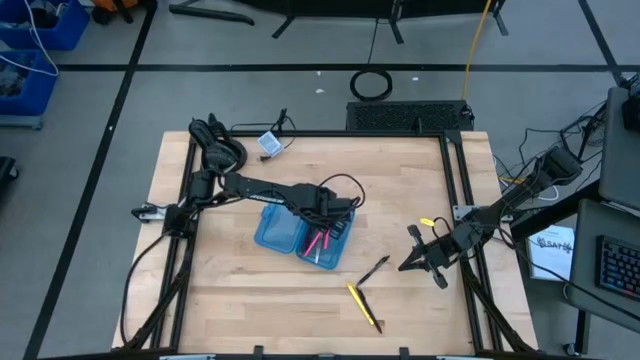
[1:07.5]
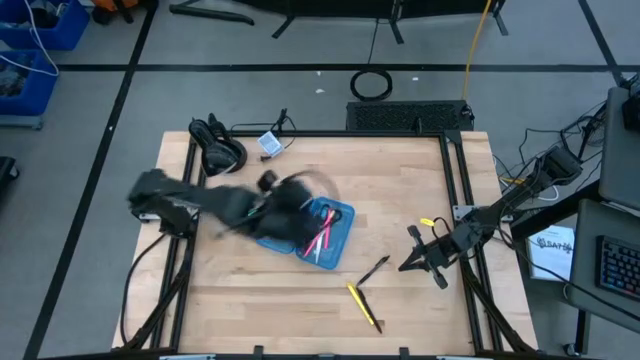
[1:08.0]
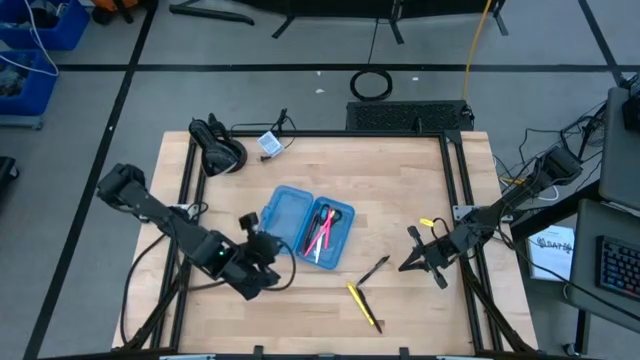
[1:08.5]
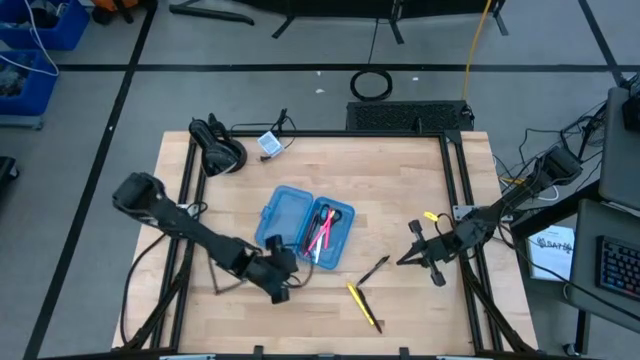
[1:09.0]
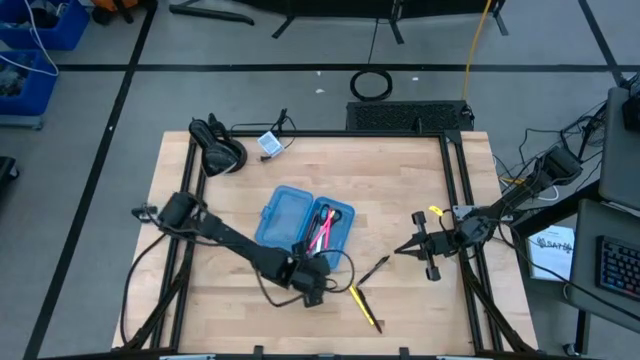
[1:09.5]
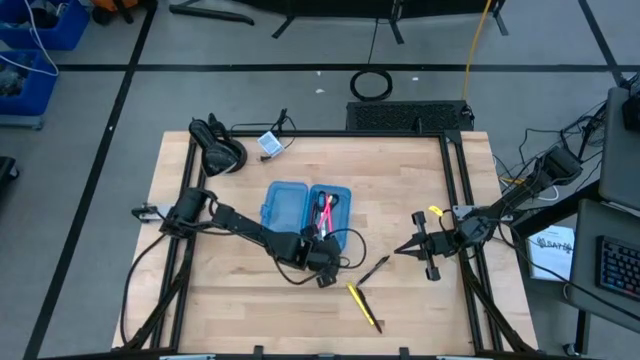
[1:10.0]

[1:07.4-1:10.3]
Task: Pick & place school supplies into a supply box
Adjust the blue supply box

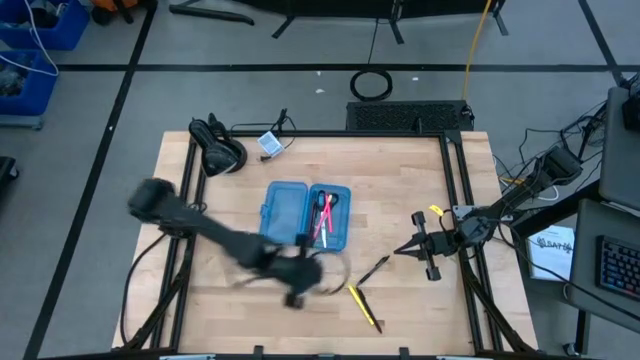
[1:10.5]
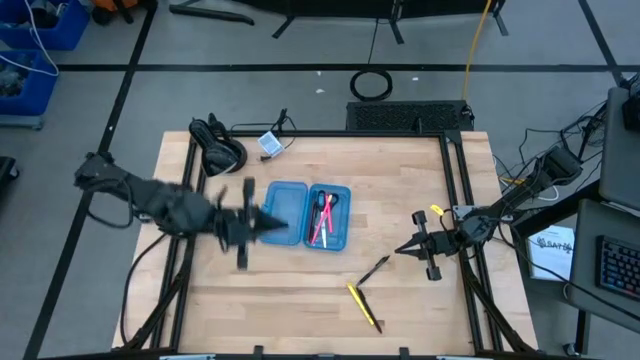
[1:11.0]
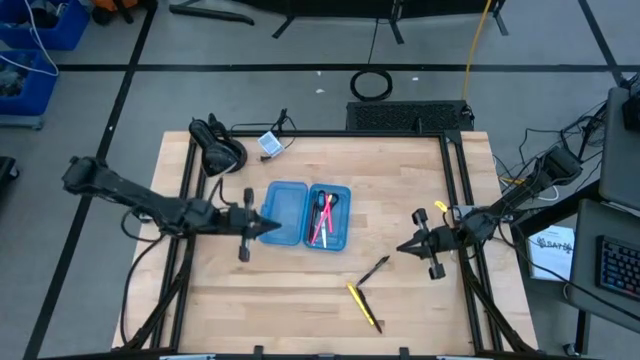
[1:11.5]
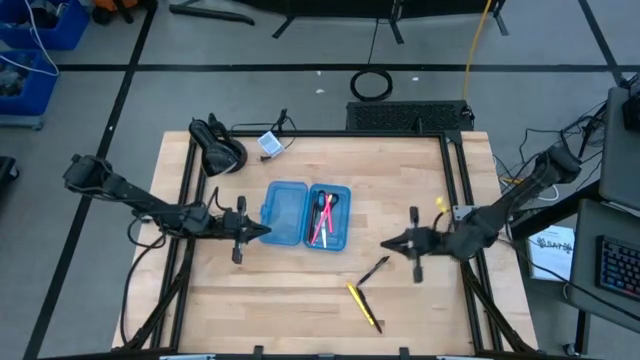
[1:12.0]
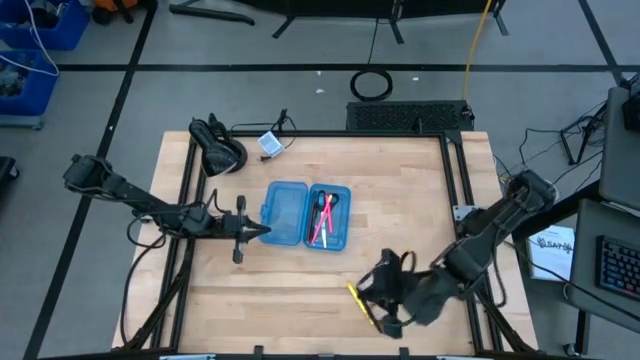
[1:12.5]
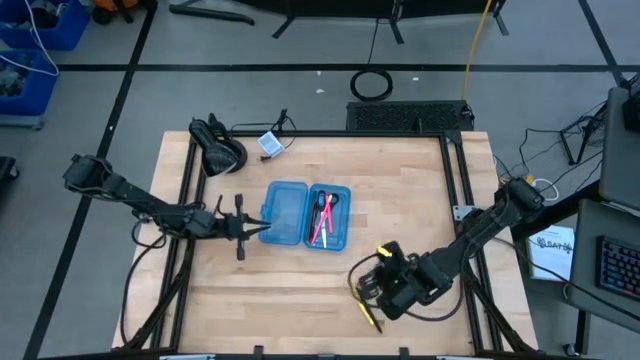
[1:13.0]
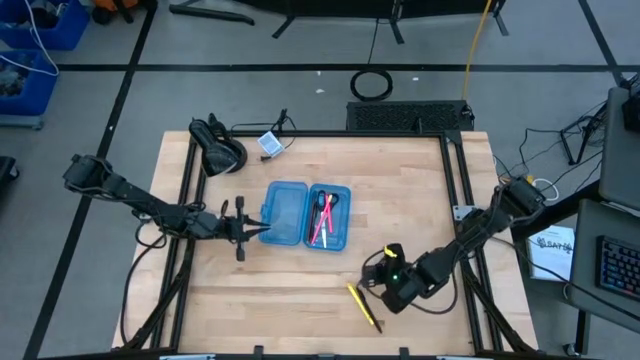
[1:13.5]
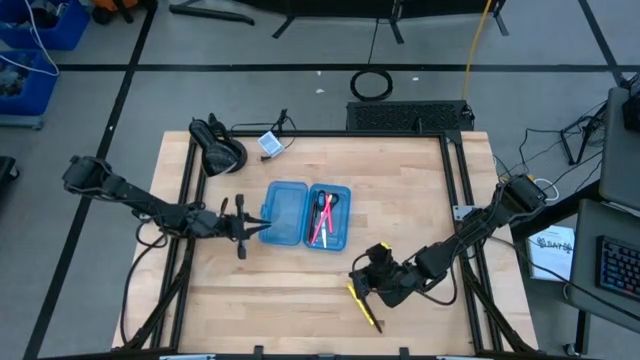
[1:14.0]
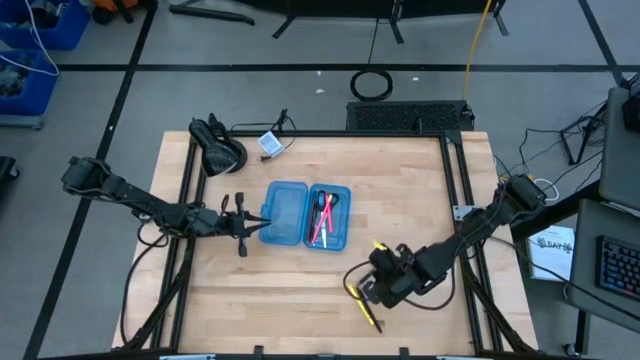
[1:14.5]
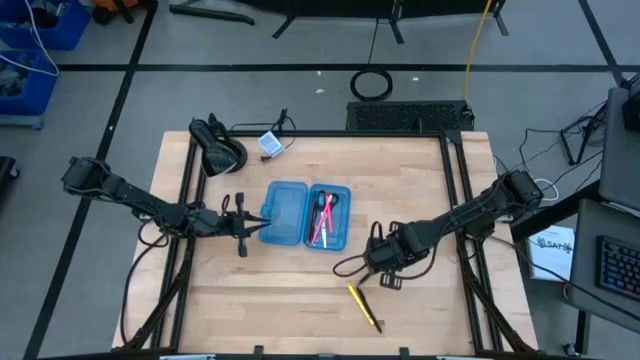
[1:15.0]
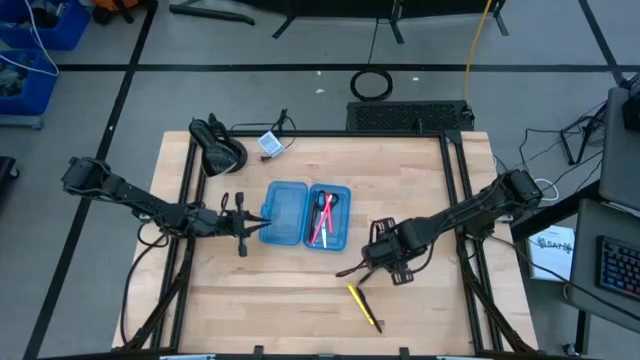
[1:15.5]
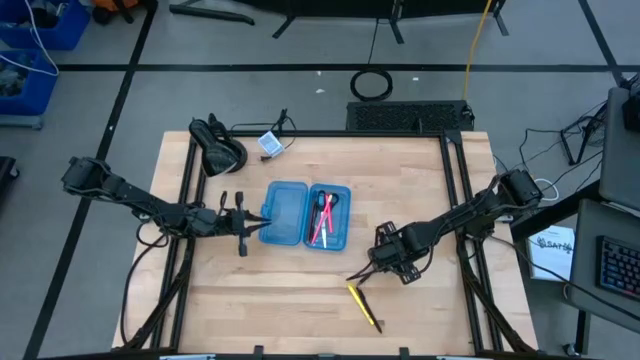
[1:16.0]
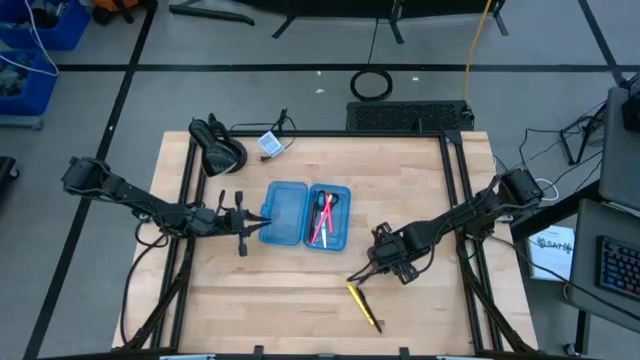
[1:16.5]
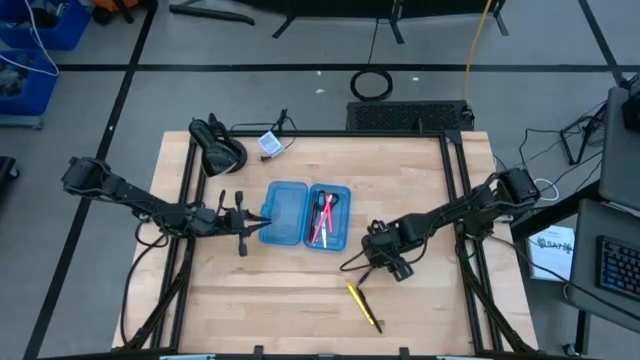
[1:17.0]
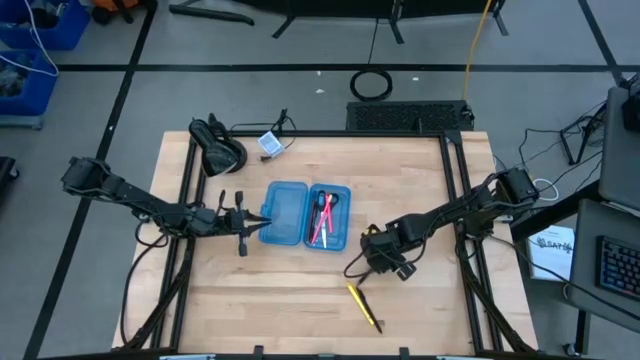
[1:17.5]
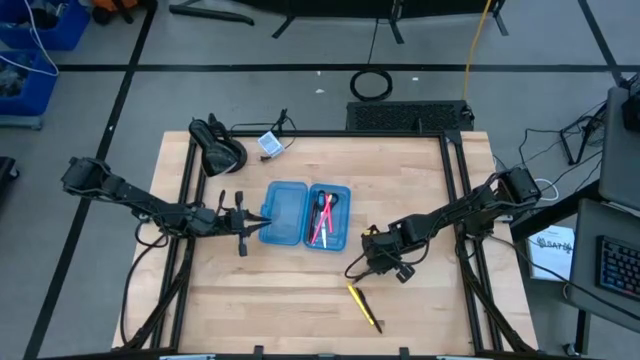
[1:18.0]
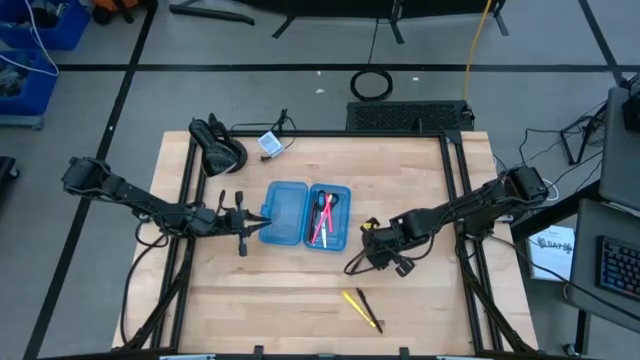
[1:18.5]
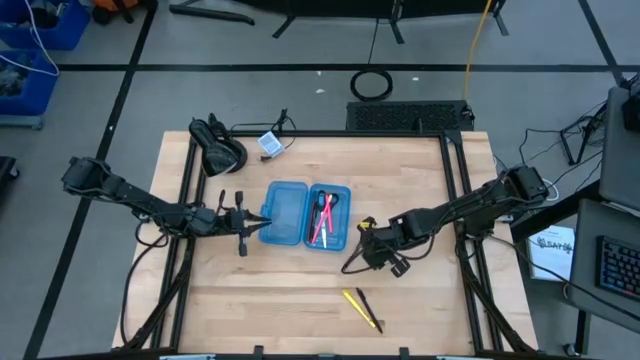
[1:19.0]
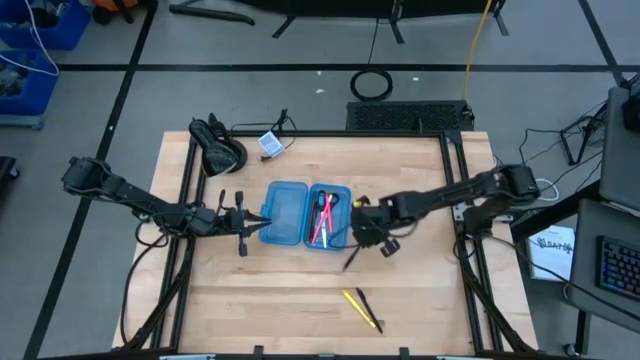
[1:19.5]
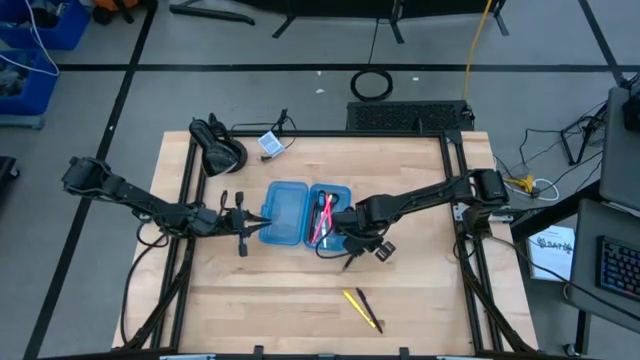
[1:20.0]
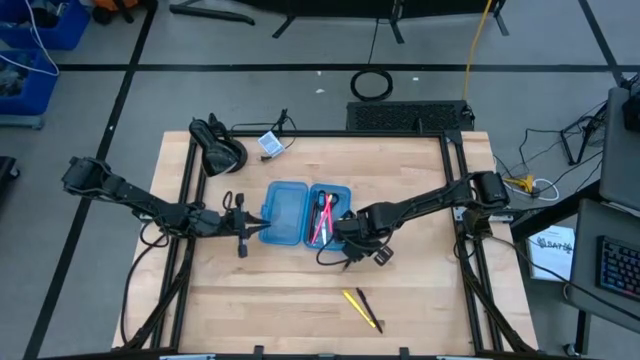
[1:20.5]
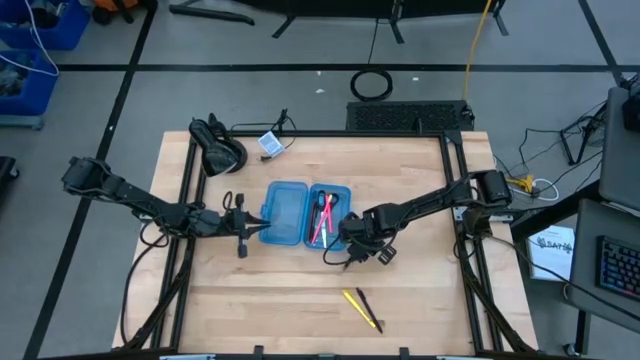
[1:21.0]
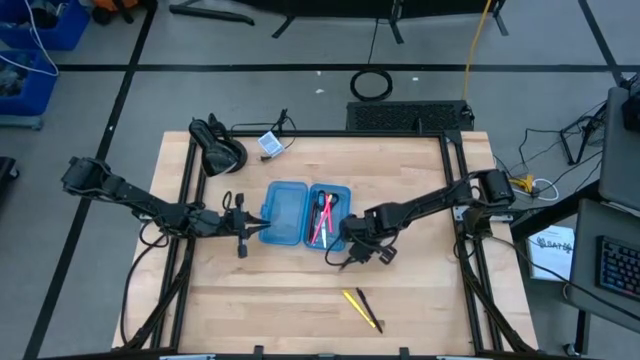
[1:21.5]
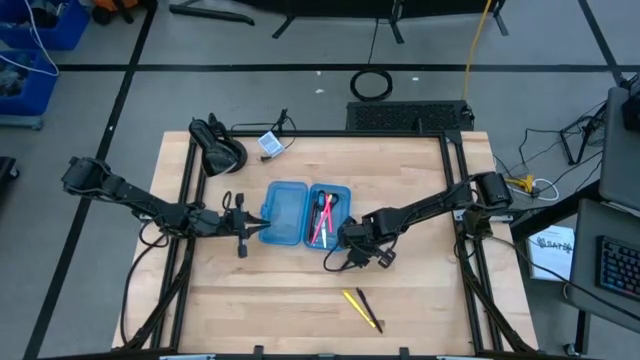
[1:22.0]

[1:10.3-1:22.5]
Put the top black pen into the blue supply box

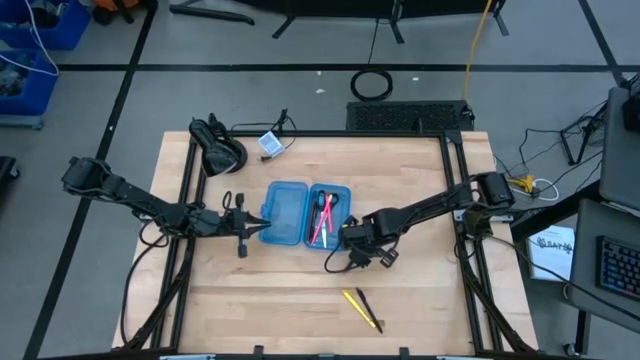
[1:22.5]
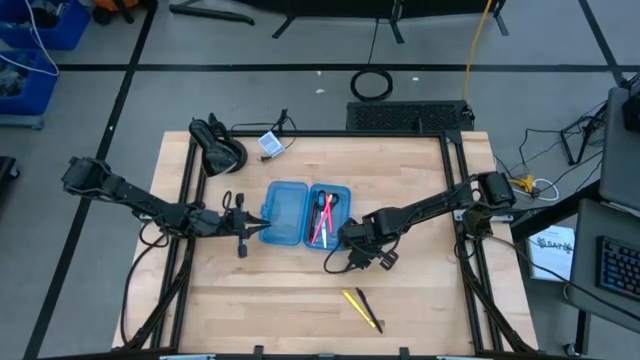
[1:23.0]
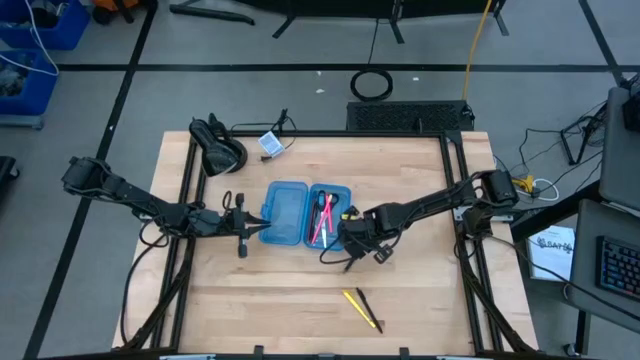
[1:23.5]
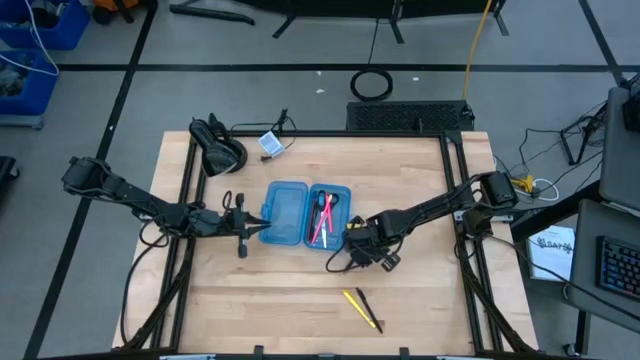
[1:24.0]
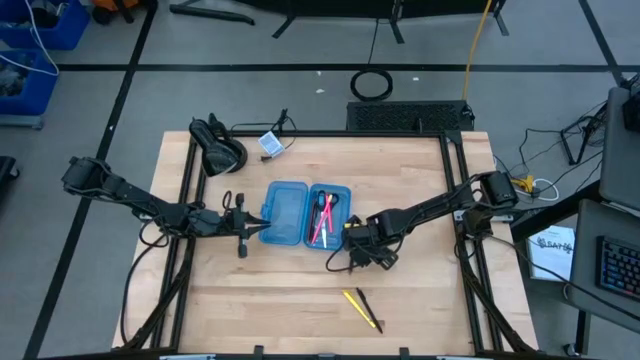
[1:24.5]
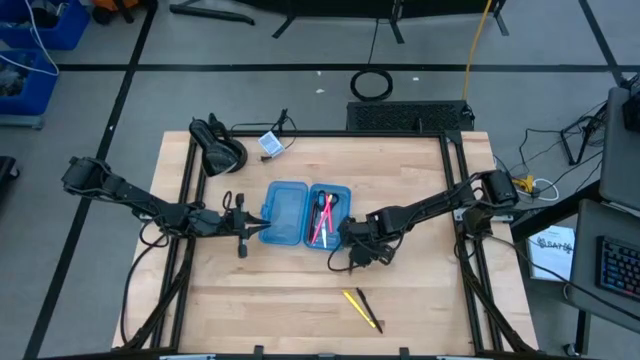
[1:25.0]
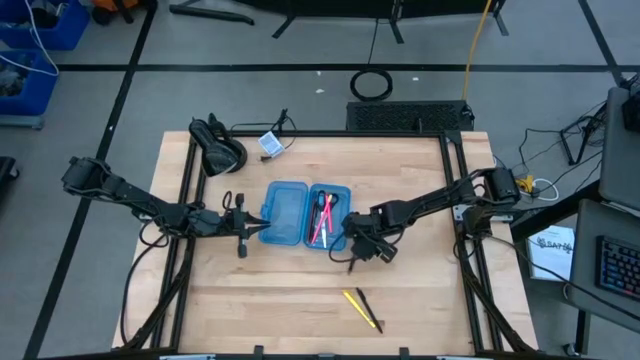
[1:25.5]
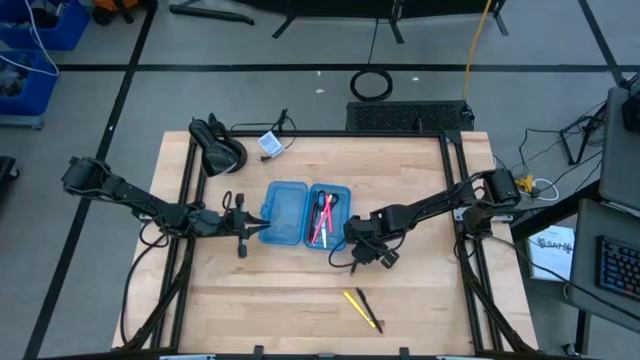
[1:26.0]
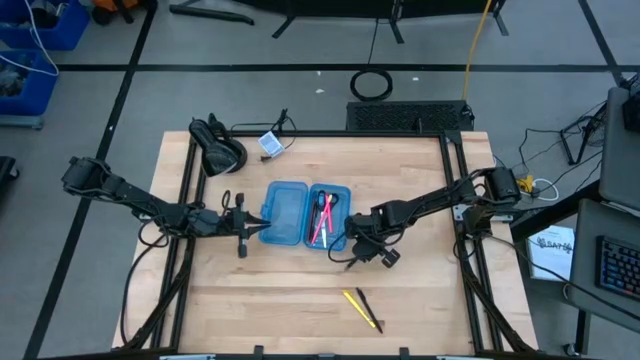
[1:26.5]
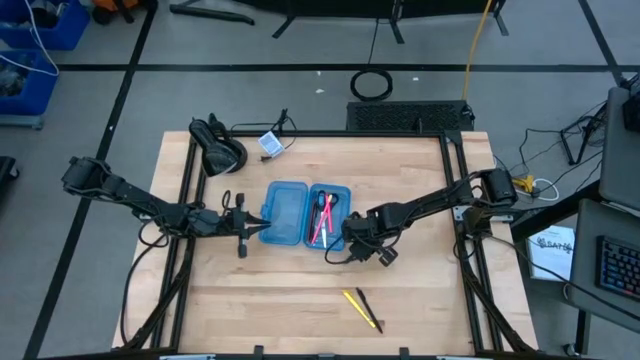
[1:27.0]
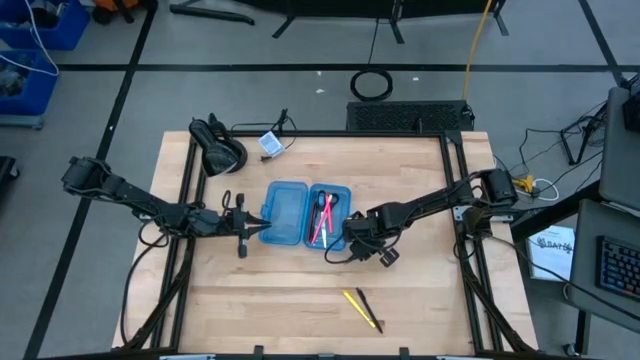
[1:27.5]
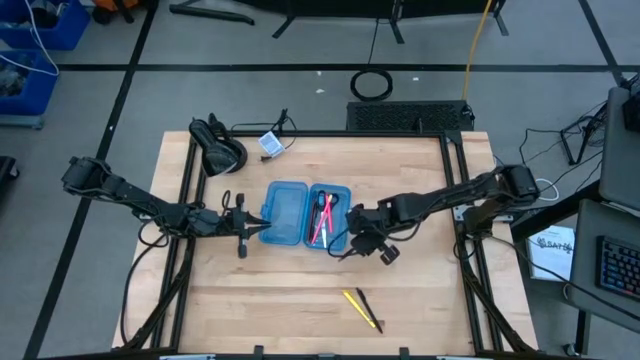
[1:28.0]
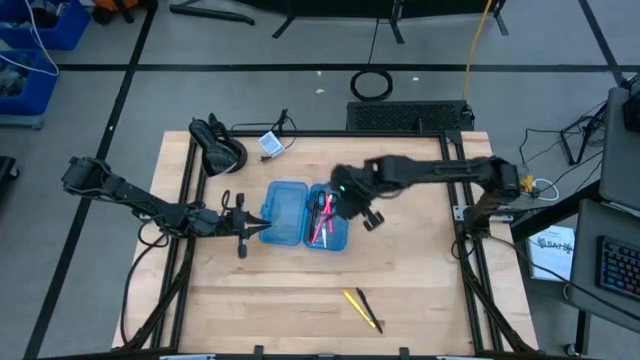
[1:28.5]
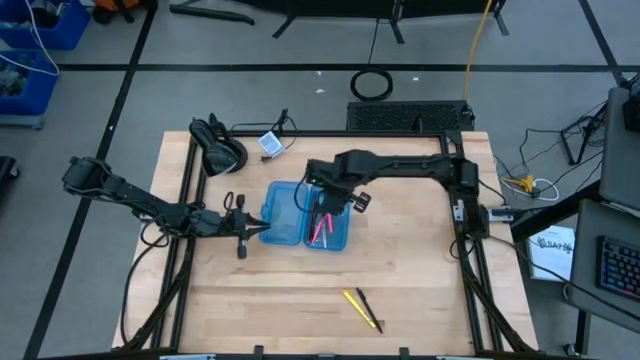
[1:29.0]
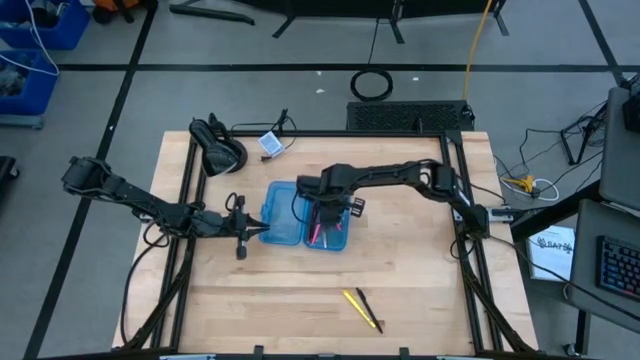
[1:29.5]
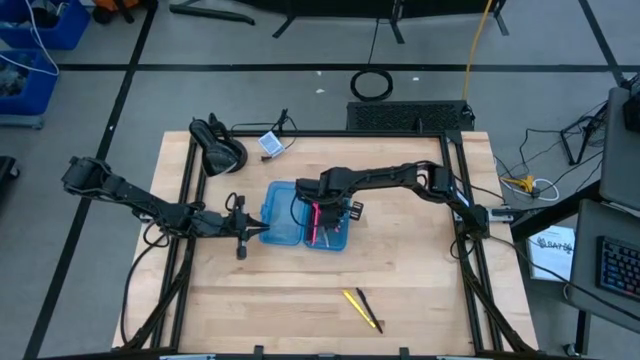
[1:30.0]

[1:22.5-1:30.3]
Put the top black pen into the blue supply box
